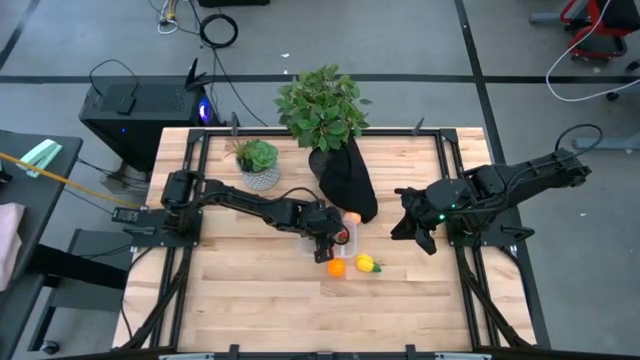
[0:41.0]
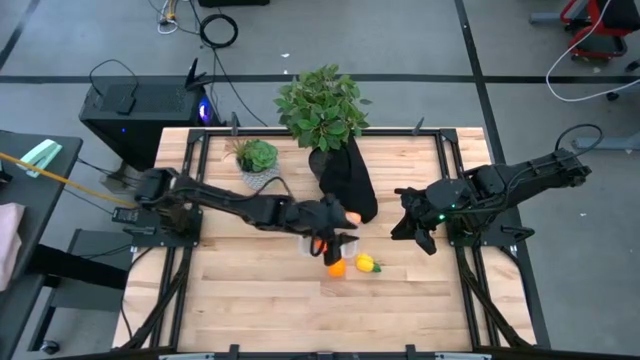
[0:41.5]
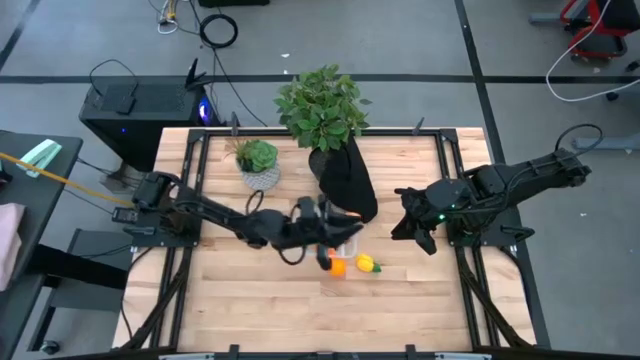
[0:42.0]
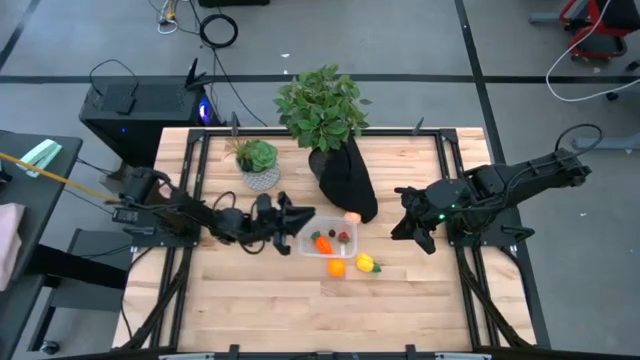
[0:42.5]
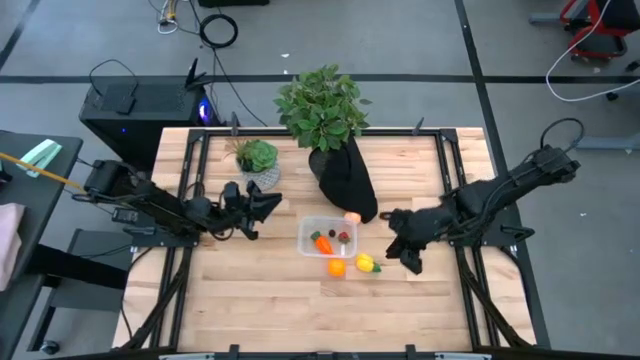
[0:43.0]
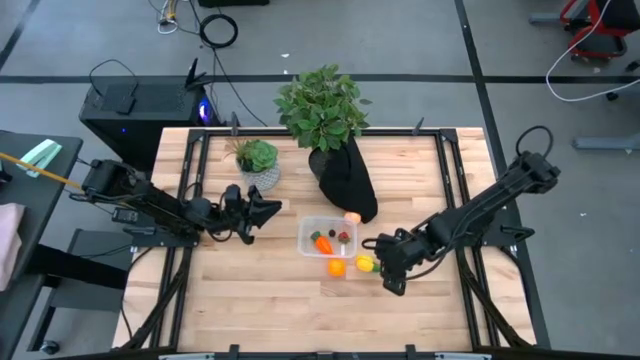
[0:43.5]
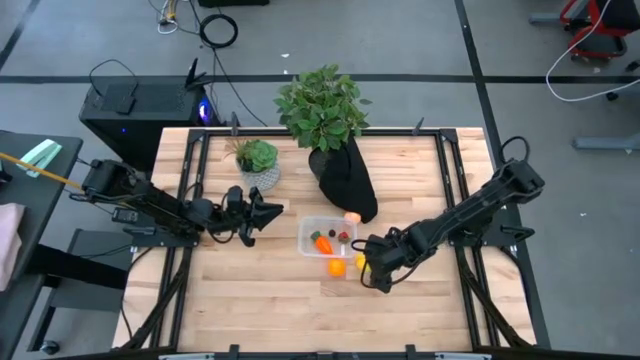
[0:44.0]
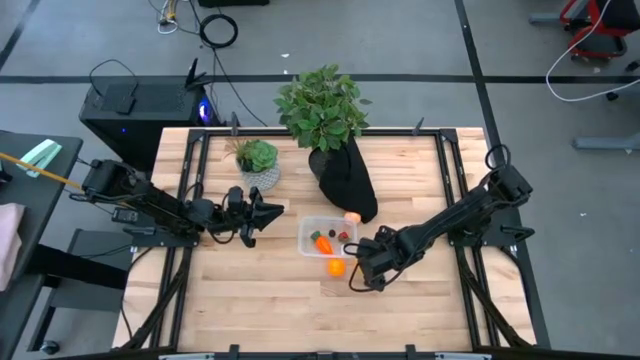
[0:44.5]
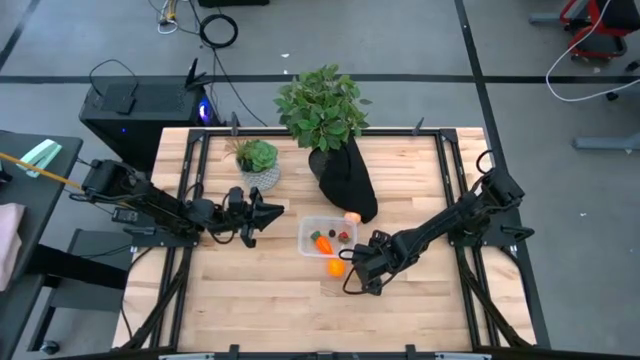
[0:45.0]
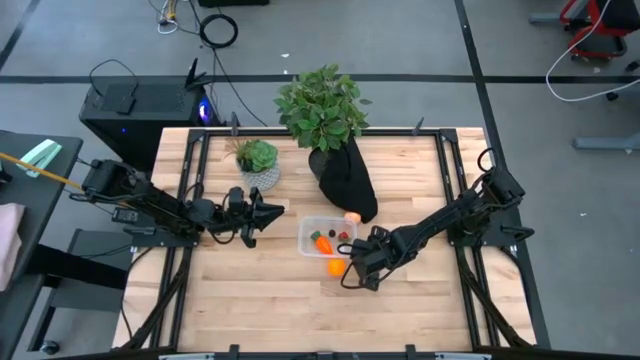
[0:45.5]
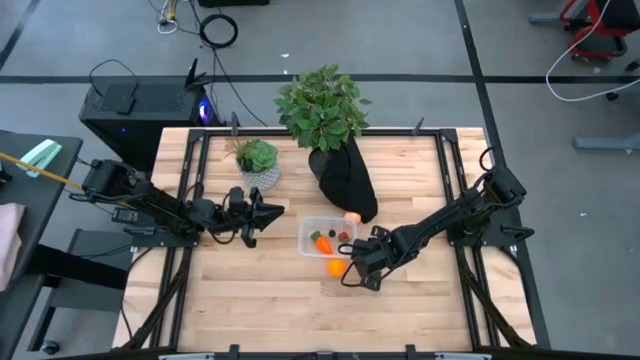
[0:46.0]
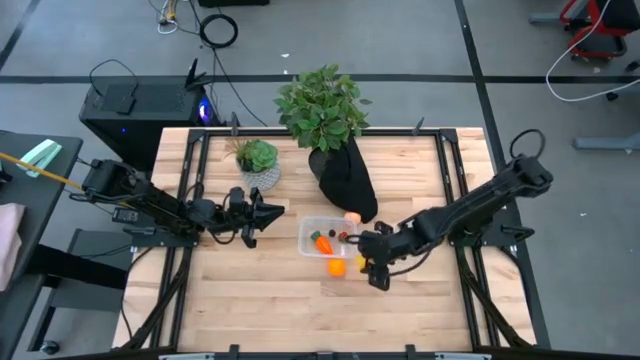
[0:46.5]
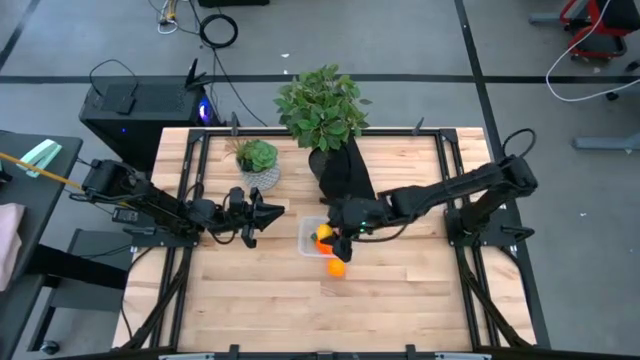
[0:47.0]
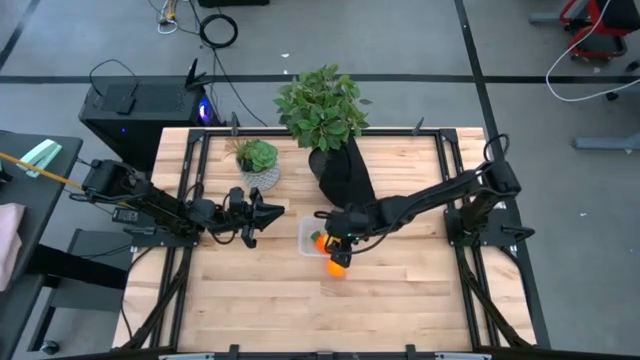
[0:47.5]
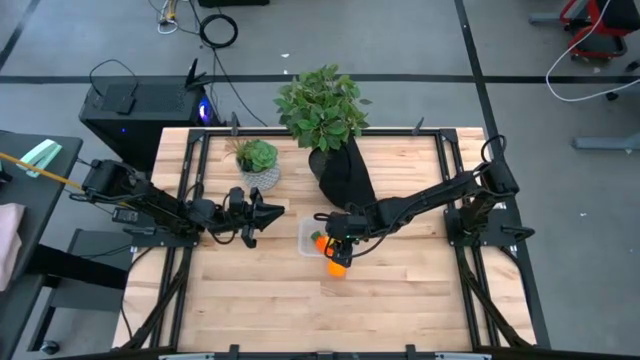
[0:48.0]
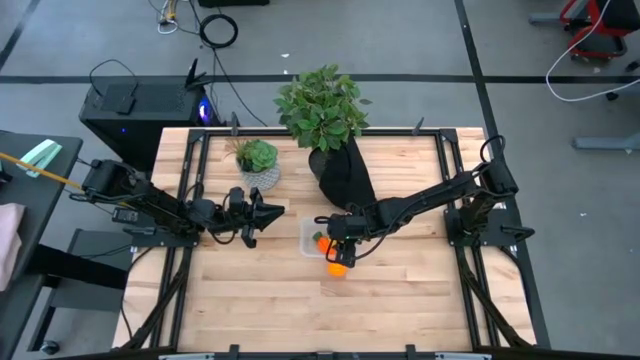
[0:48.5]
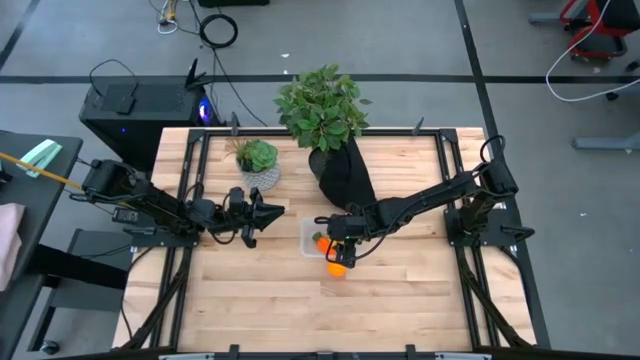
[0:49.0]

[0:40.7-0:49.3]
Task: Pick and placing Produce into tupperware
Put the yellow pineapple into the transparent bin

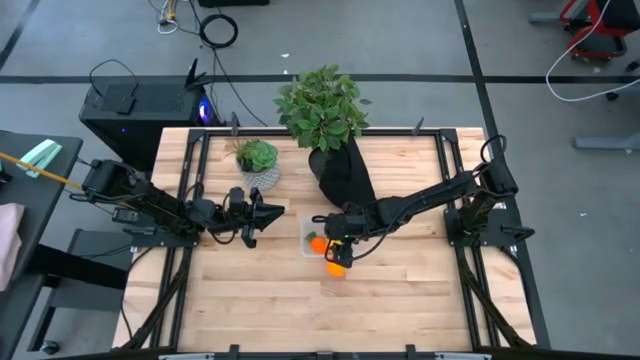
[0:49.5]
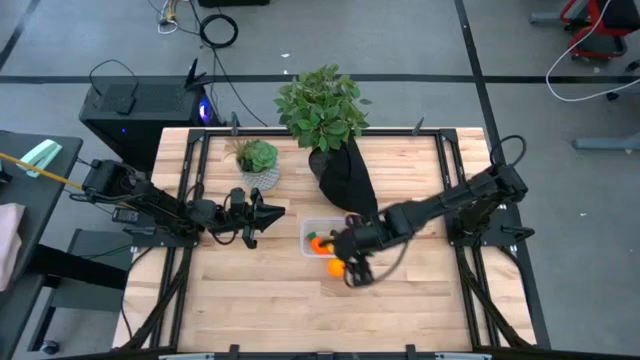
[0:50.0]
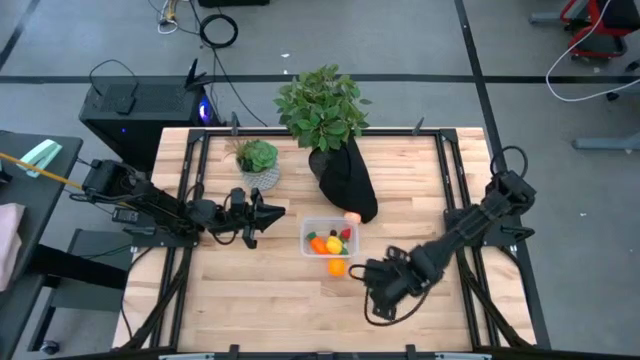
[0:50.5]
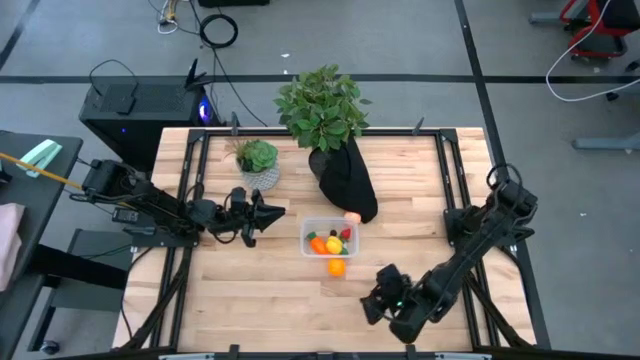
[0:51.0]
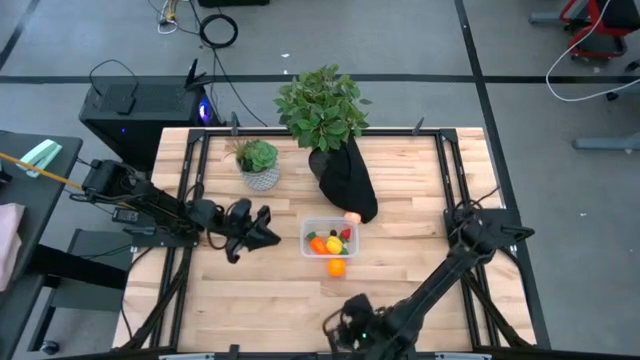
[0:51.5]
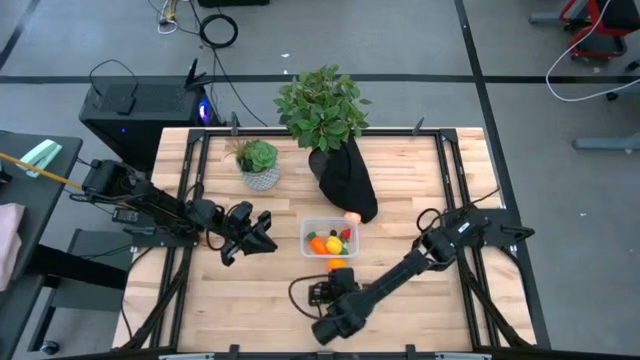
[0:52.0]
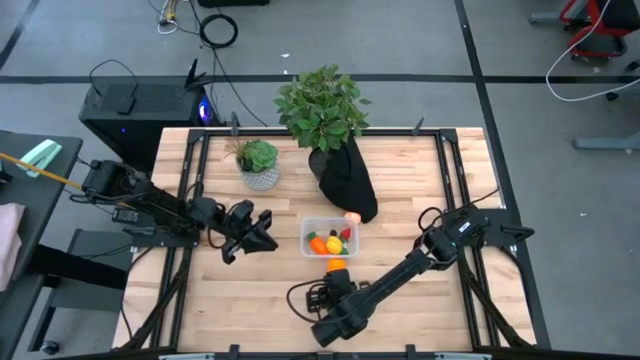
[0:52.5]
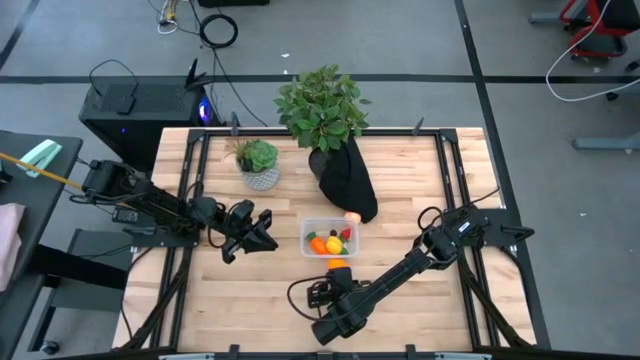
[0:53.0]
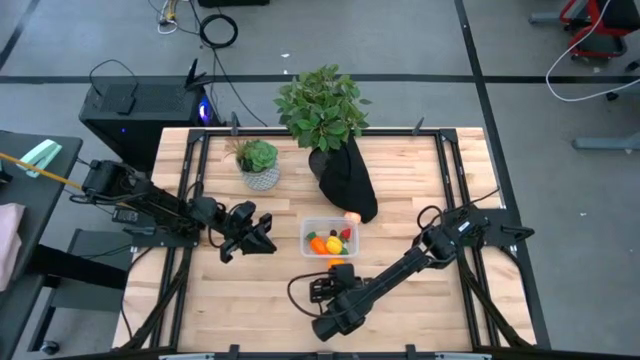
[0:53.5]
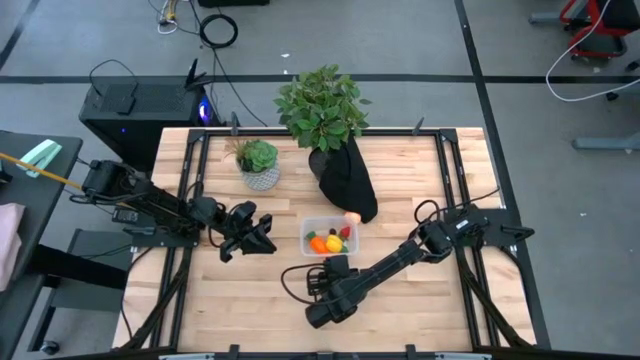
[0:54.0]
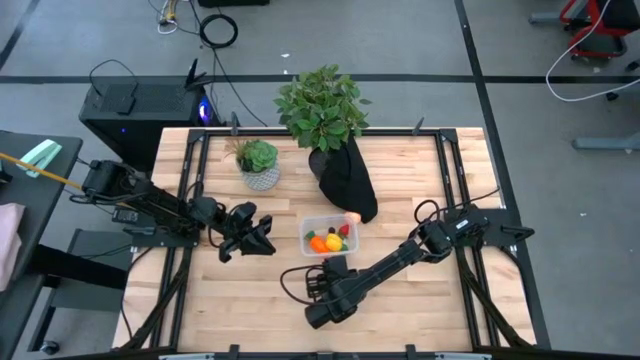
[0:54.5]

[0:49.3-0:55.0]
Put the orange into the transparent bin

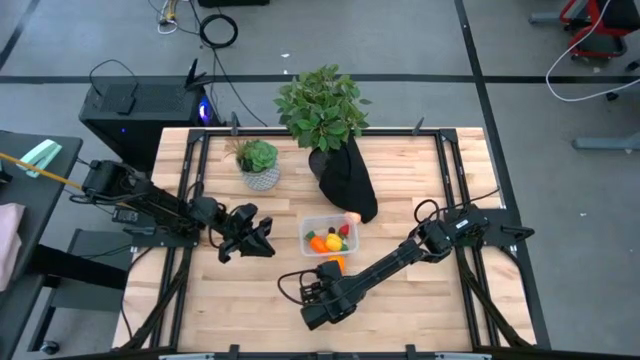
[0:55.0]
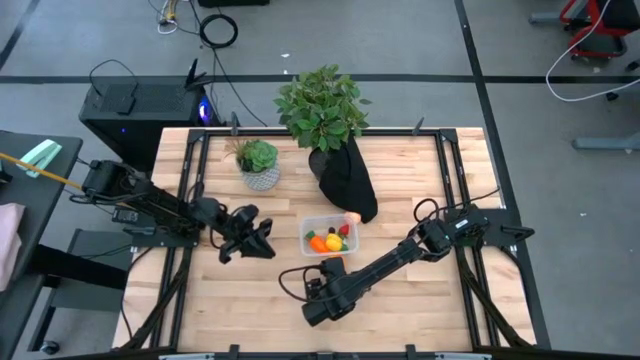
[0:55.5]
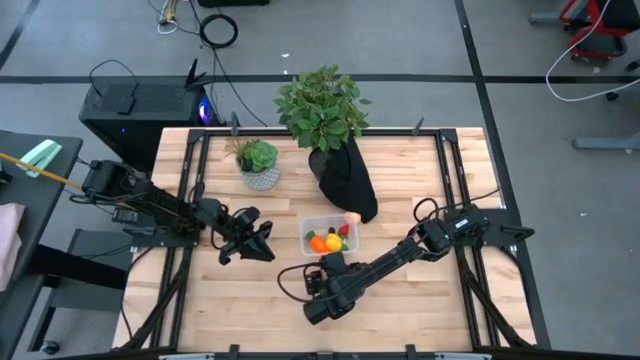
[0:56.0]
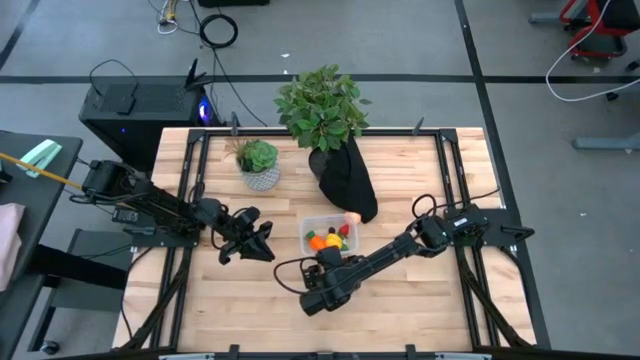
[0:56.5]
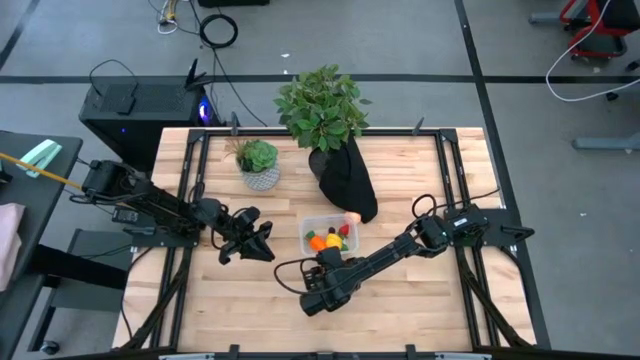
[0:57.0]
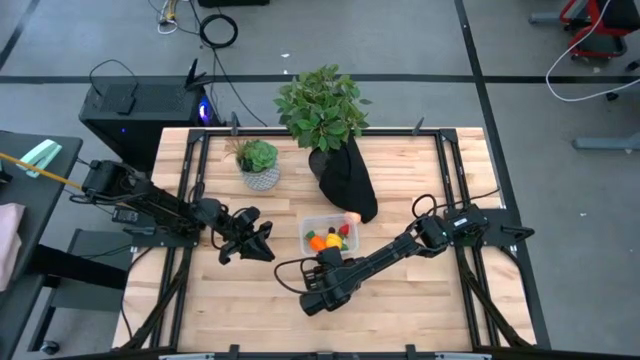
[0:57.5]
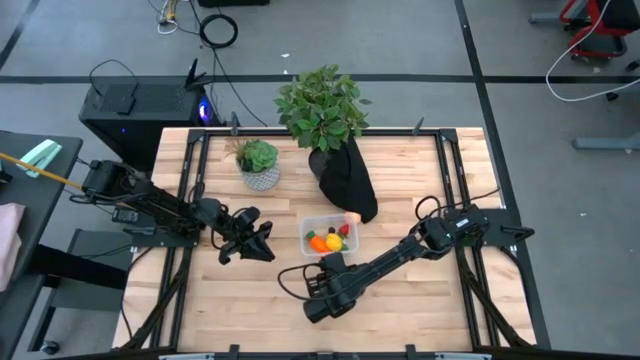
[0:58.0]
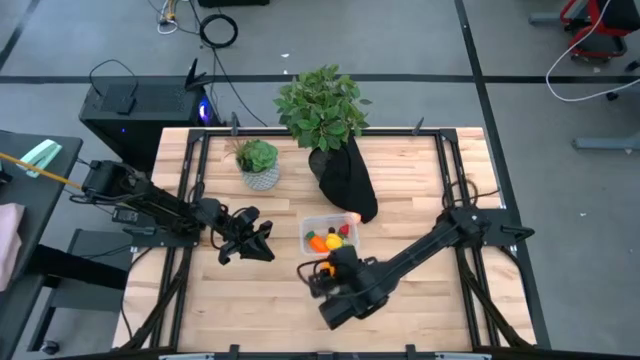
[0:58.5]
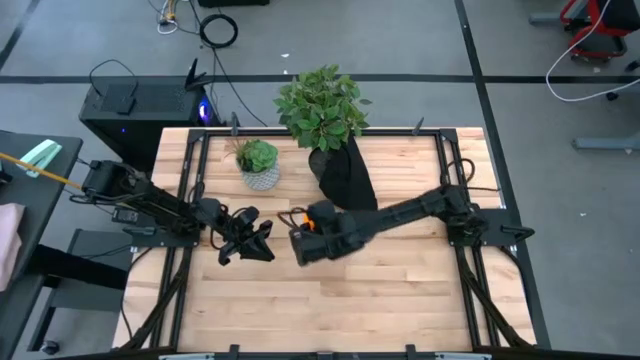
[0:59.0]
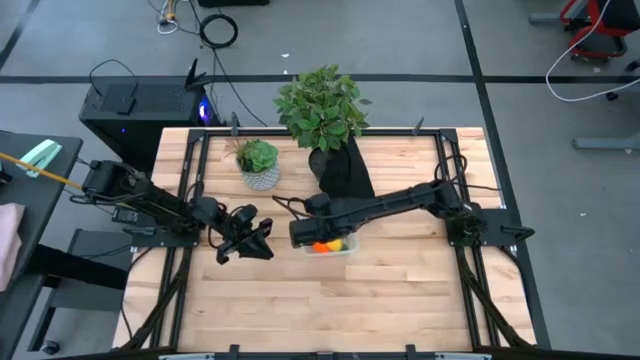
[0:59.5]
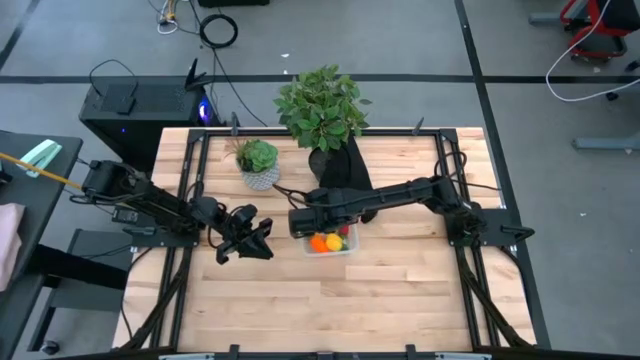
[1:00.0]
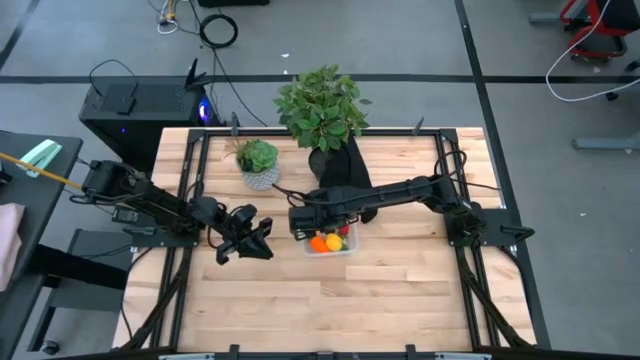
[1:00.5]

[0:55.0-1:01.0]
Put the orange into the transparent bin
